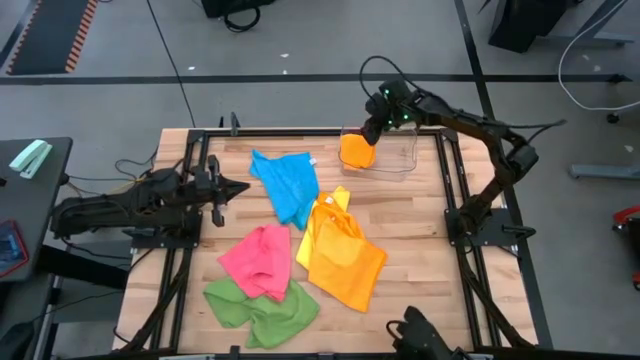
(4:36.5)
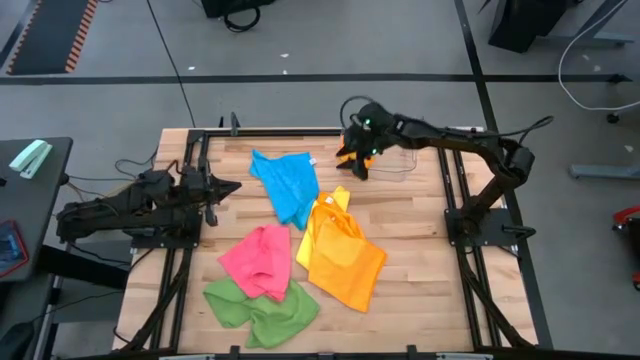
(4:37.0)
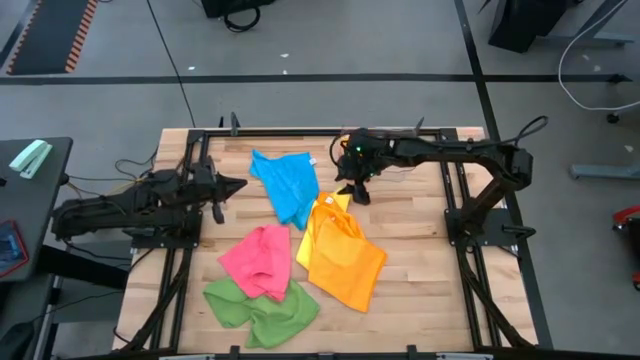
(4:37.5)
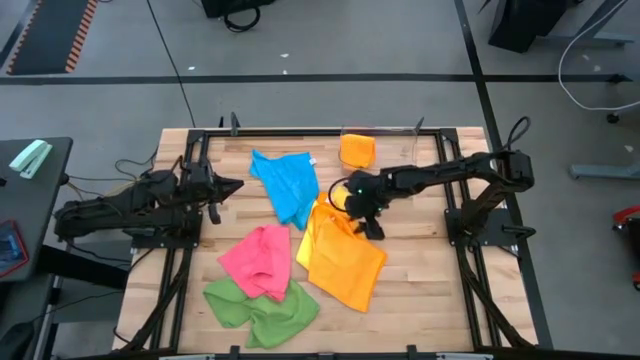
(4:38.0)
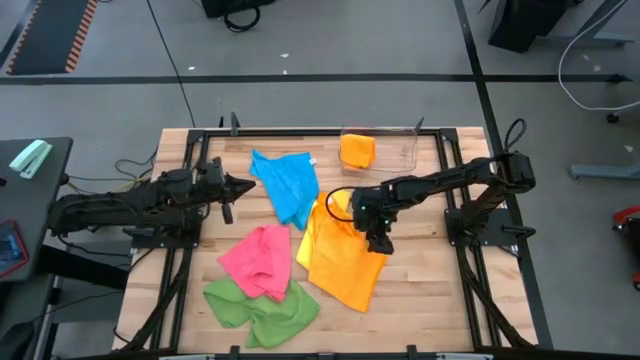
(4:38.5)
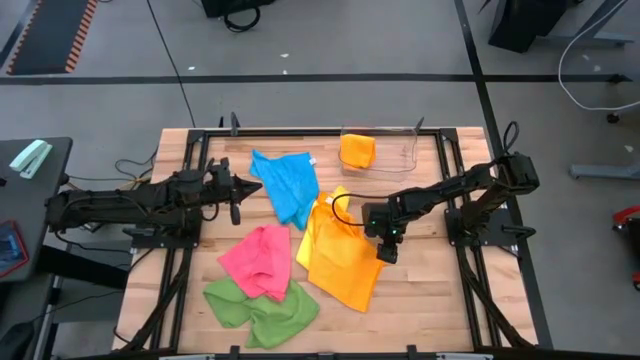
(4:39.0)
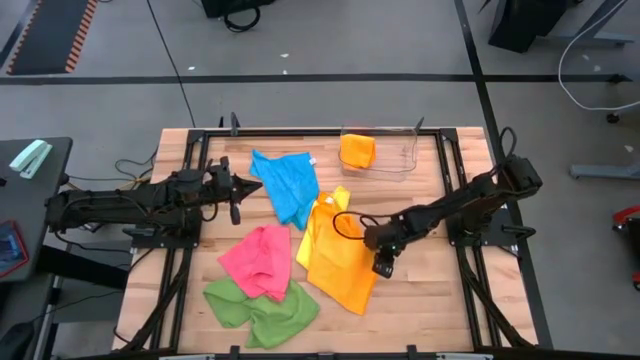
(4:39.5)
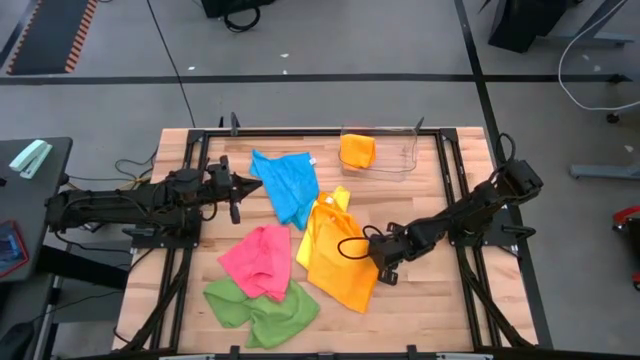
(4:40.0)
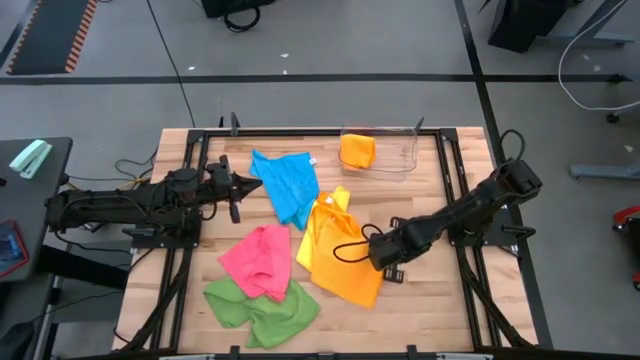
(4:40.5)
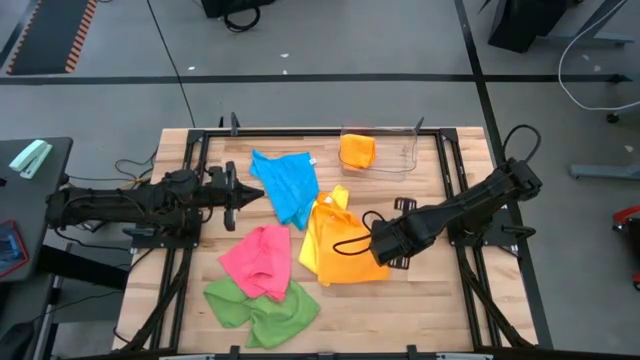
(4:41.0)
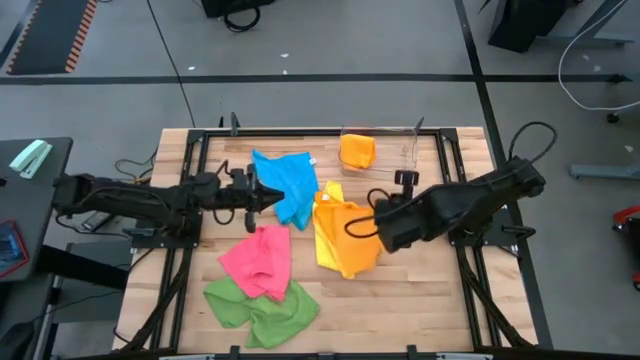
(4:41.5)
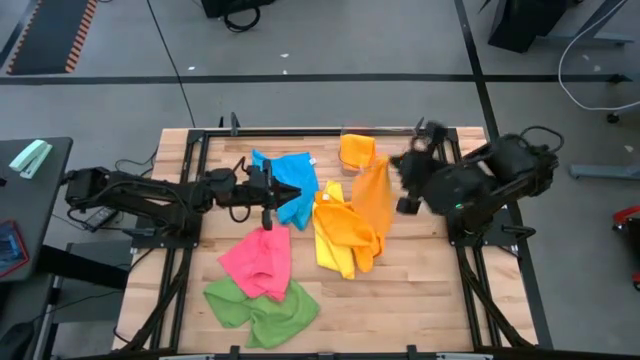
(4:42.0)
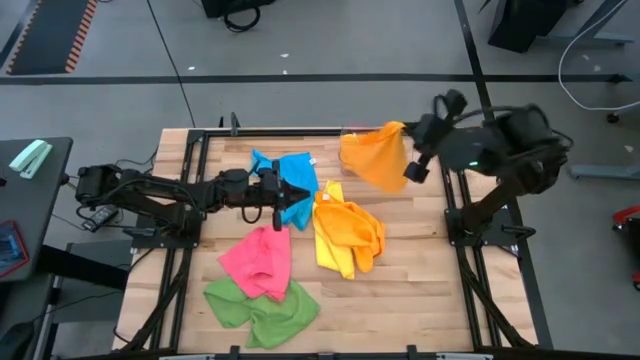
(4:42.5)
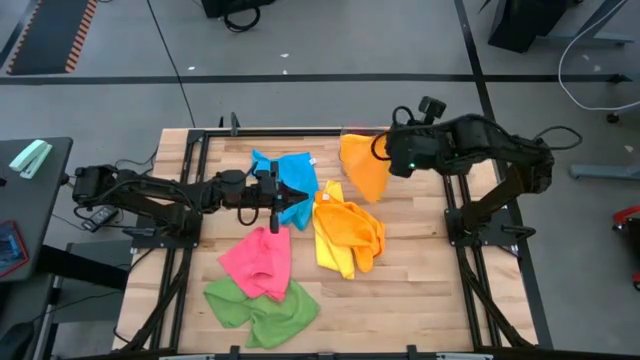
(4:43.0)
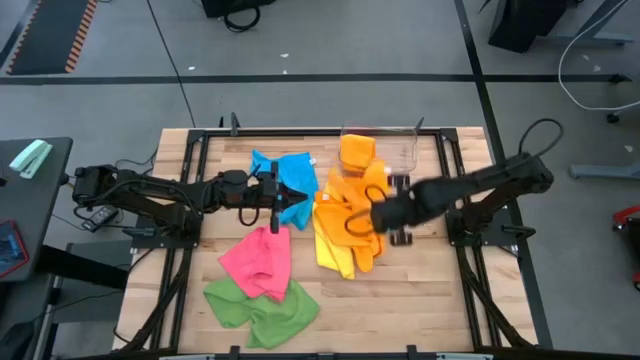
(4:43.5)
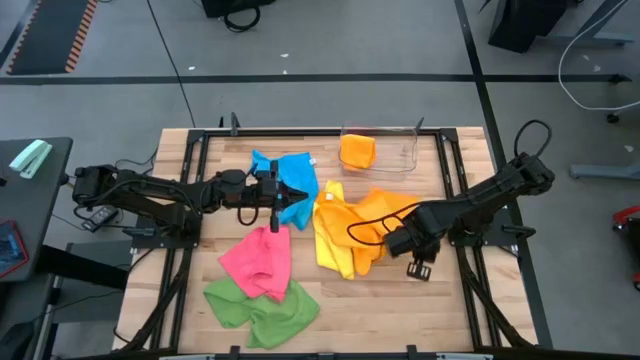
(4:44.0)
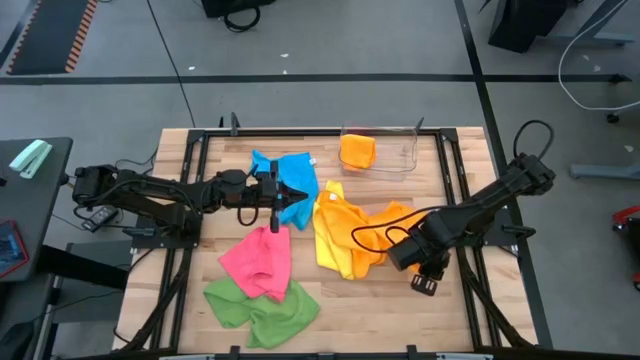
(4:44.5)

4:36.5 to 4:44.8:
Task: Fold microfiber towels
Move the right orange microfiber cloth to the middle right of the table

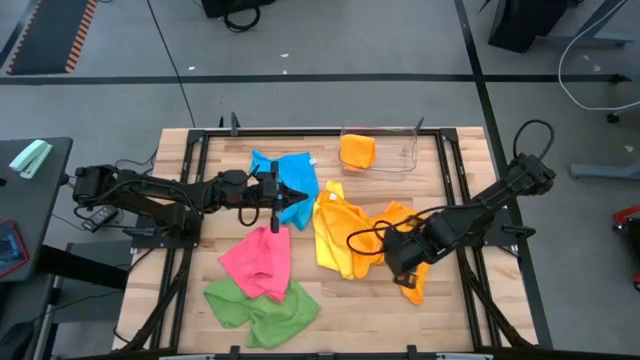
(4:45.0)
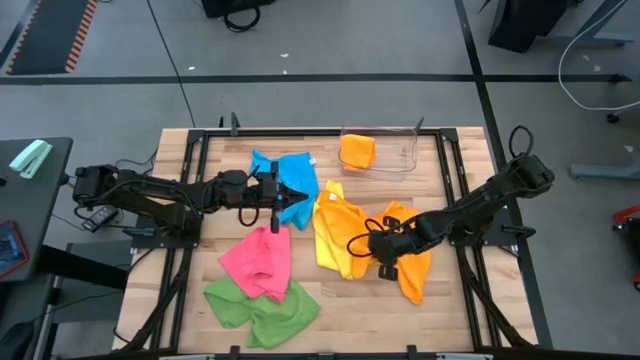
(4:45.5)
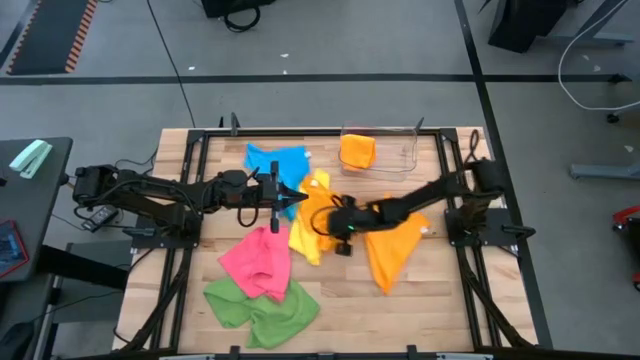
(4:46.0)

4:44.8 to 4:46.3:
Adjust the colored microfiber cloths

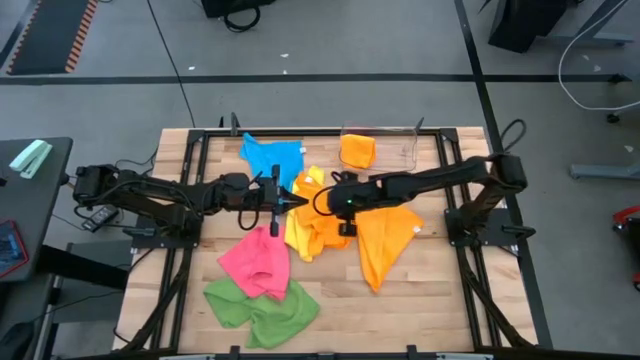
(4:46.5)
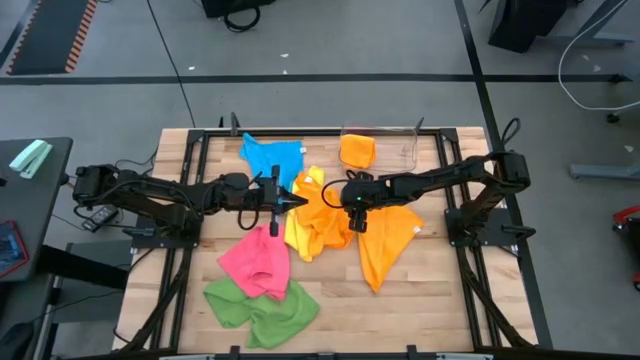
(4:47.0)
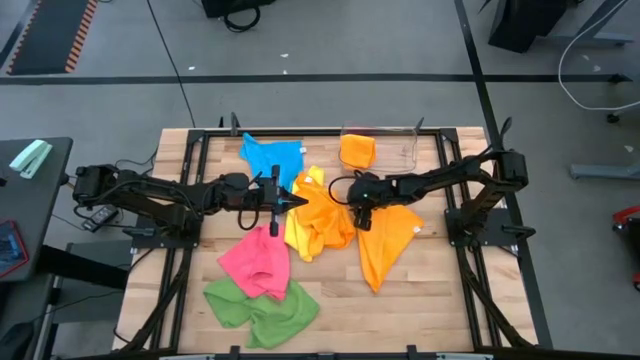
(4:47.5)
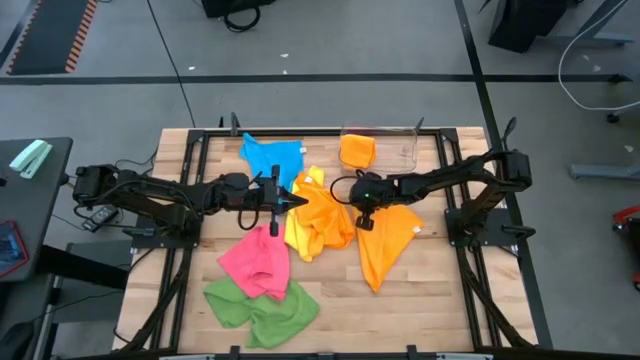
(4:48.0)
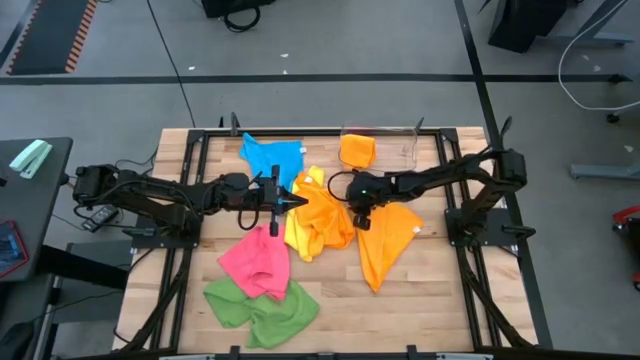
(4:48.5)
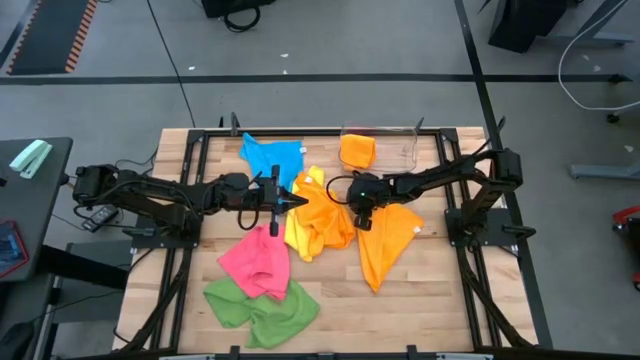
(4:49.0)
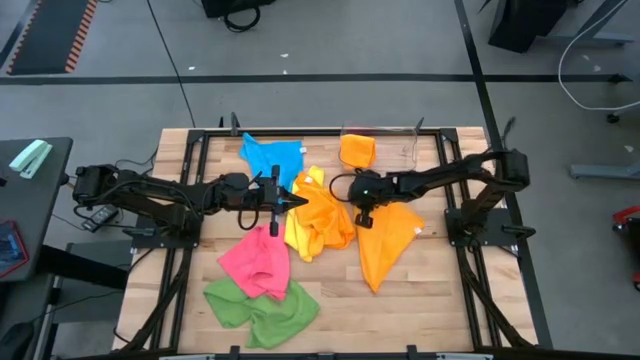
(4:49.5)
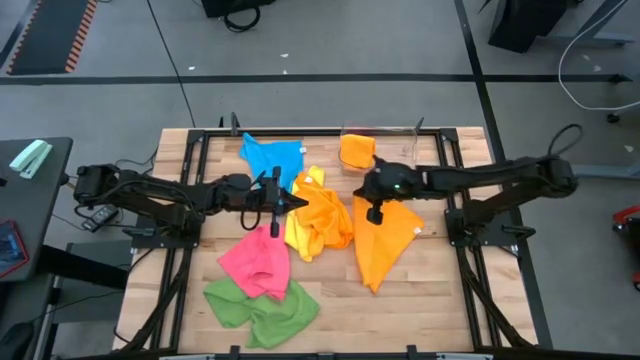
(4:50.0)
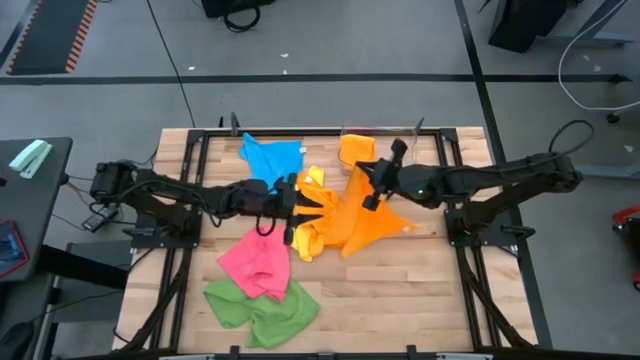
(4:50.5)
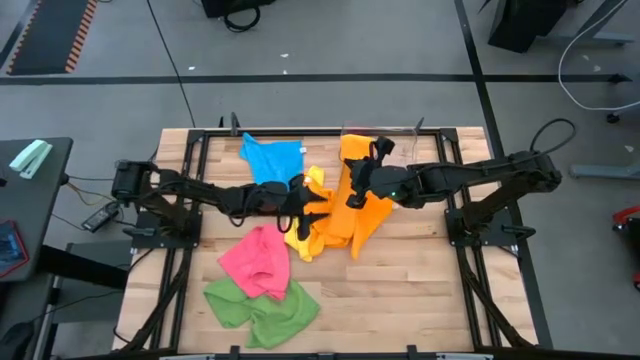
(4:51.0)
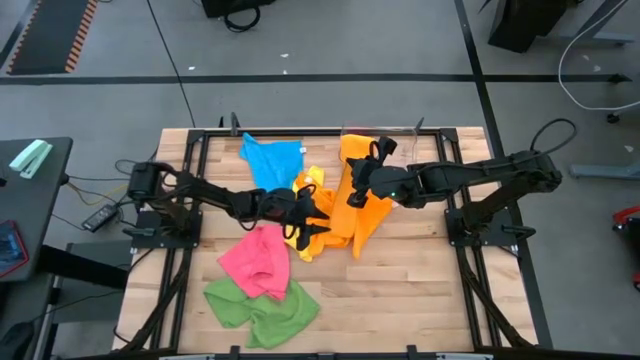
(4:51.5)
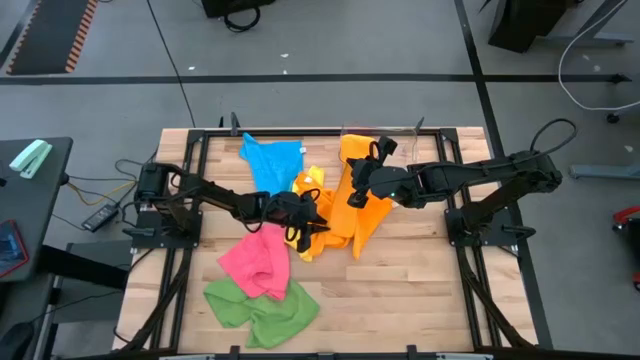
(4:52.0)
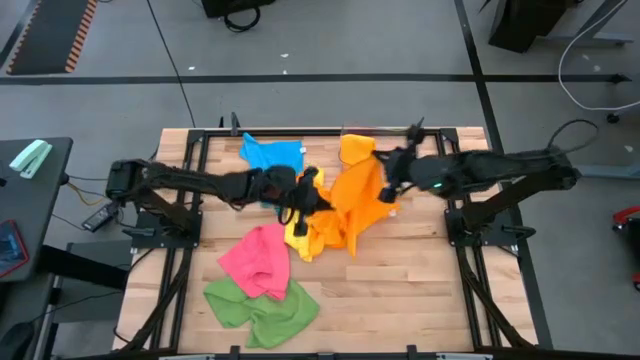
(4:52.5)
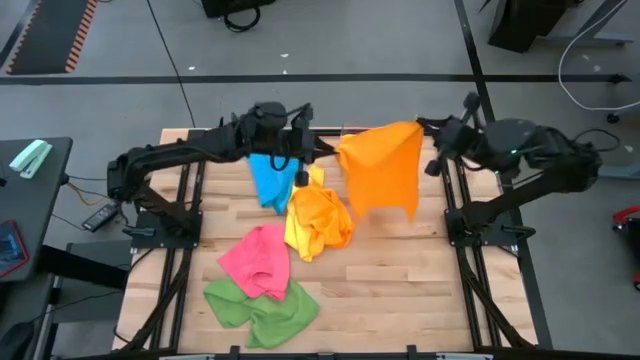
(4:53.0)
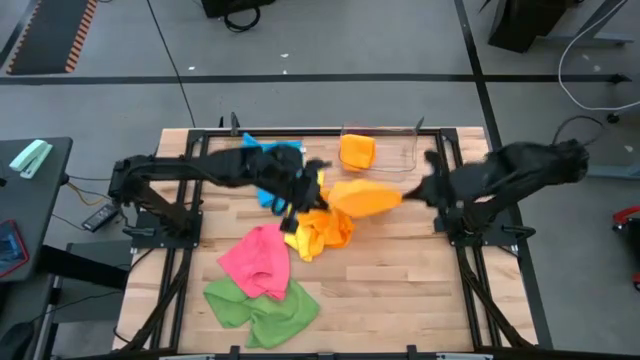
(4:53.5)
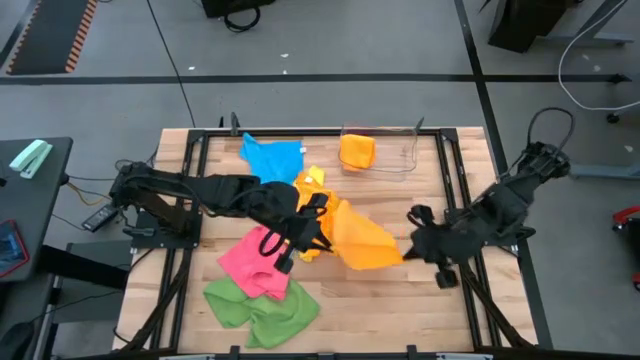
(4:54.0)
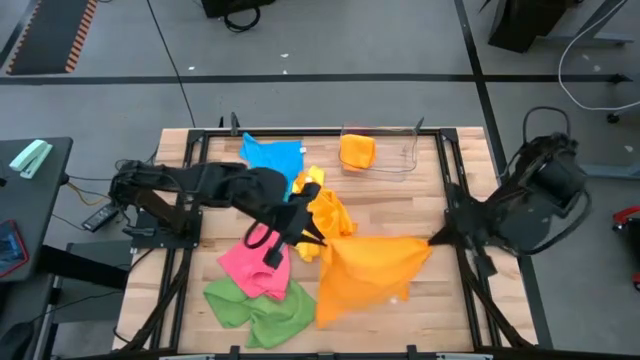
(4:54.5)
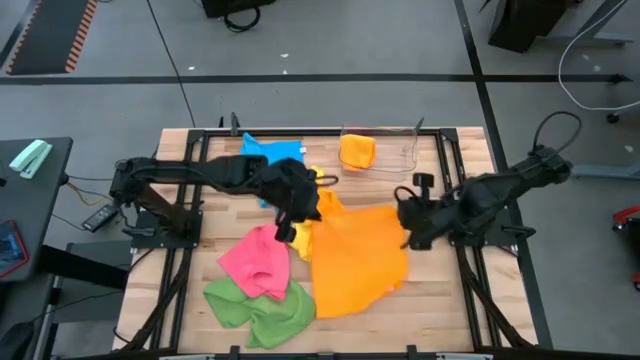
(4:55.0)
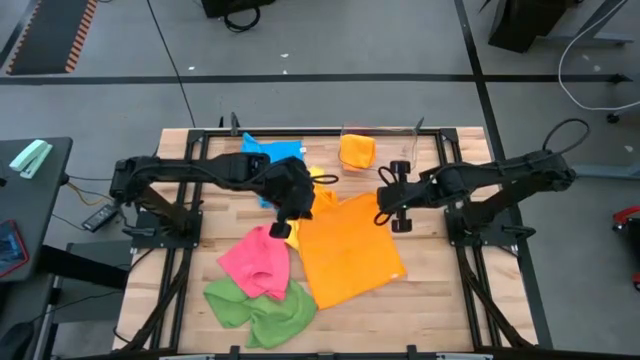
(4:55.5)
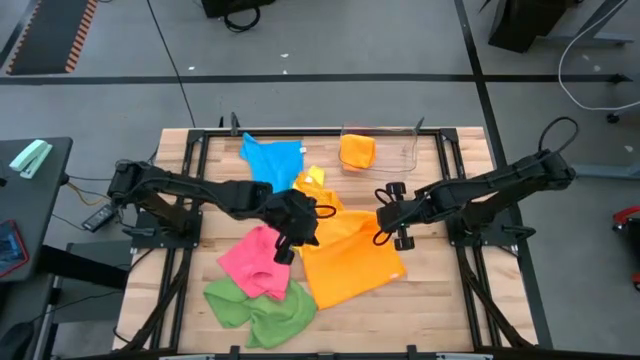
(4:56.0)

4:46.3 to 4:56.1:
Fold the right orange microfiber cloth
